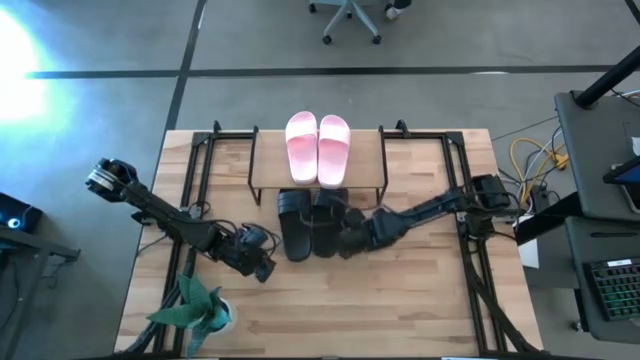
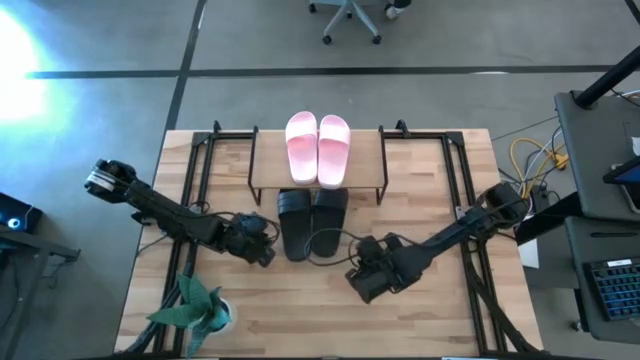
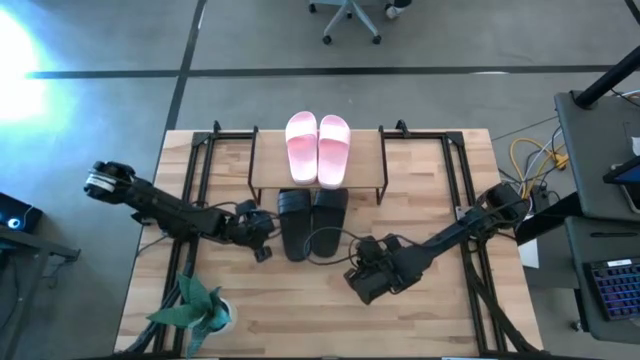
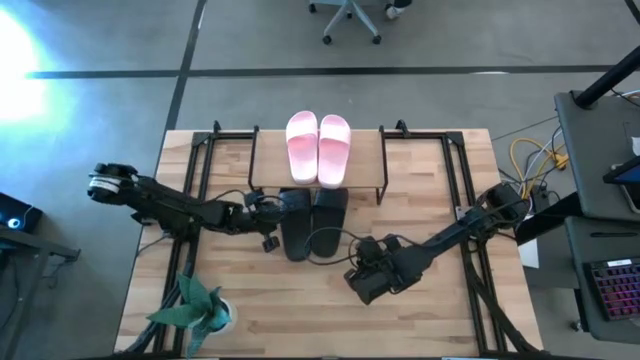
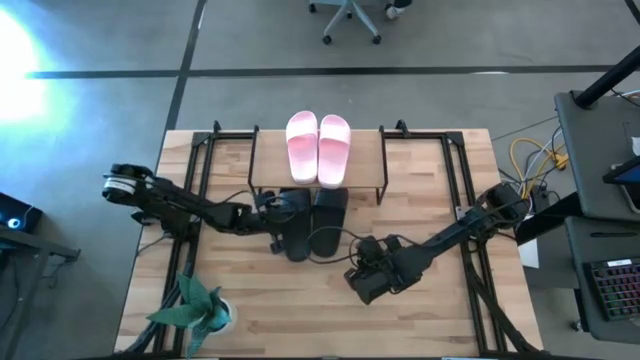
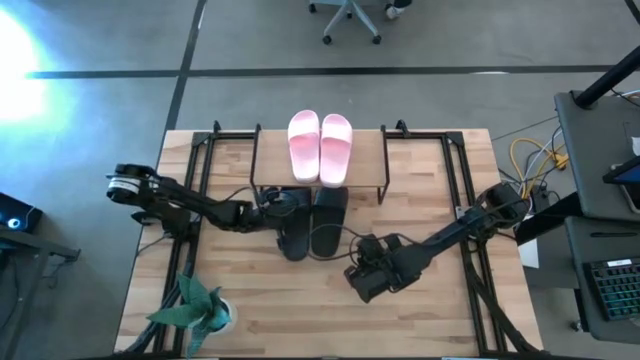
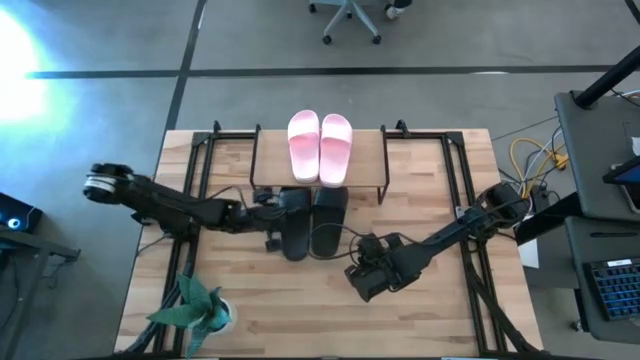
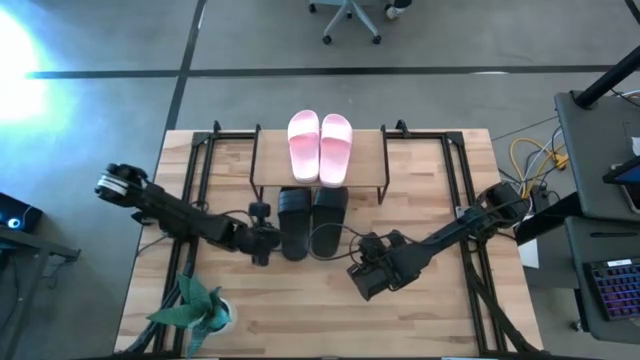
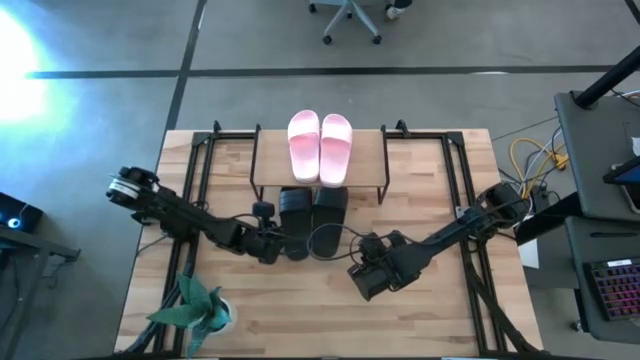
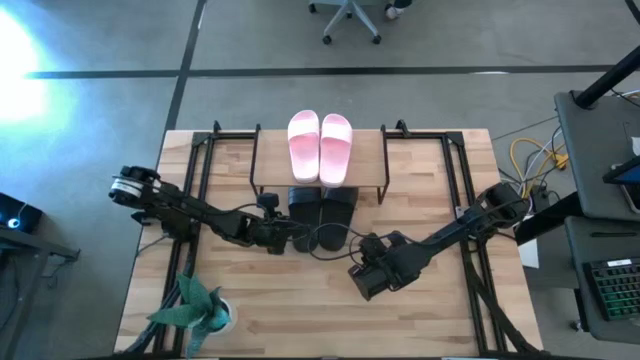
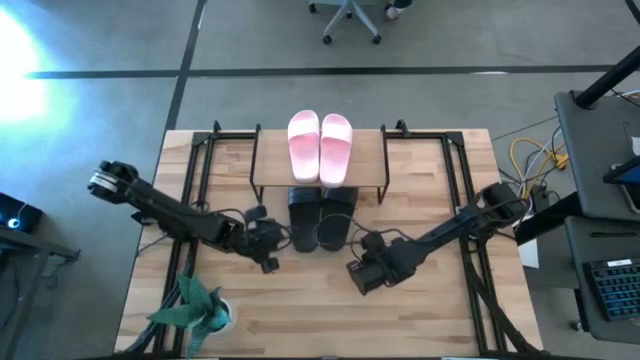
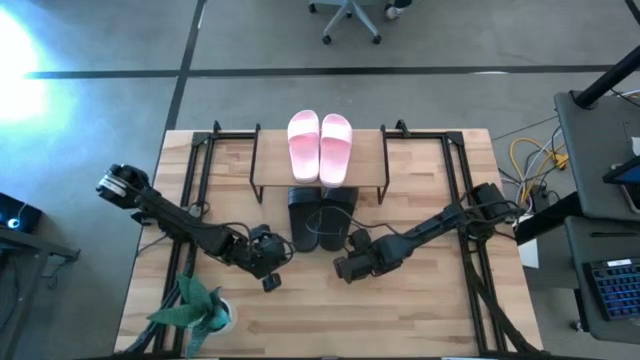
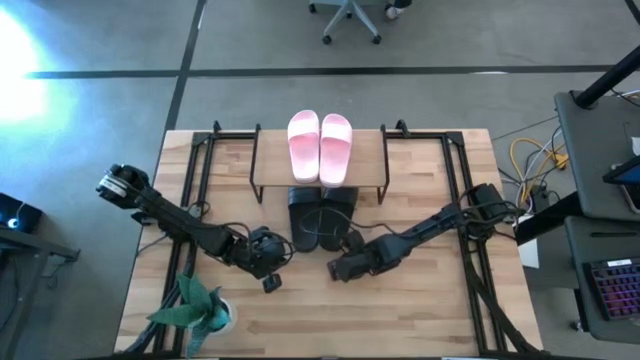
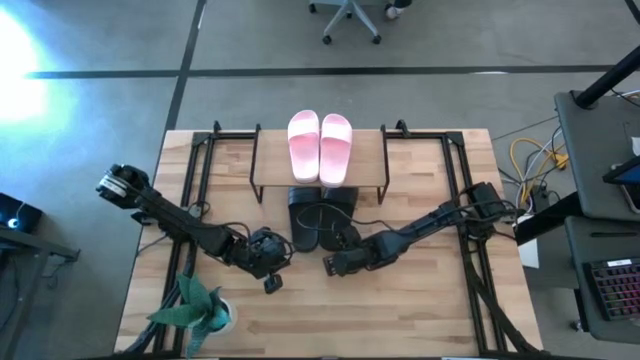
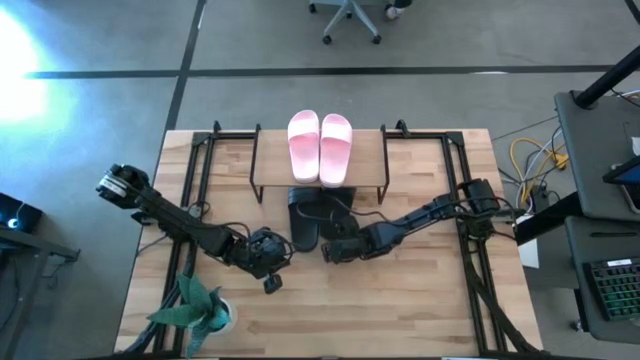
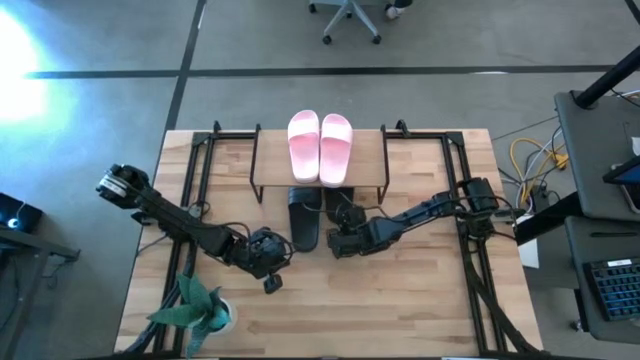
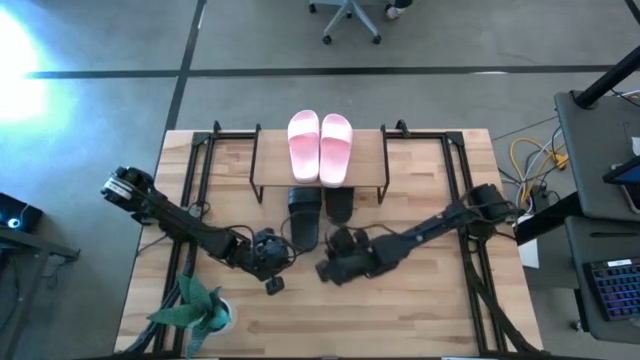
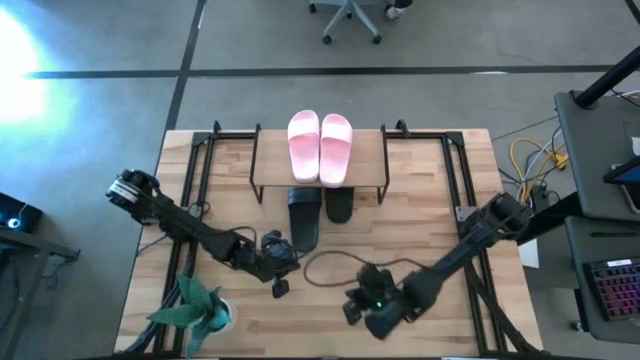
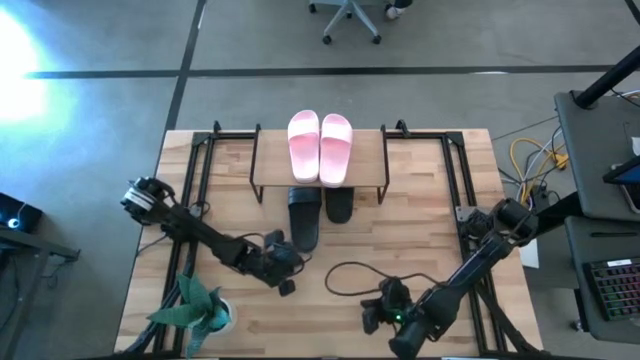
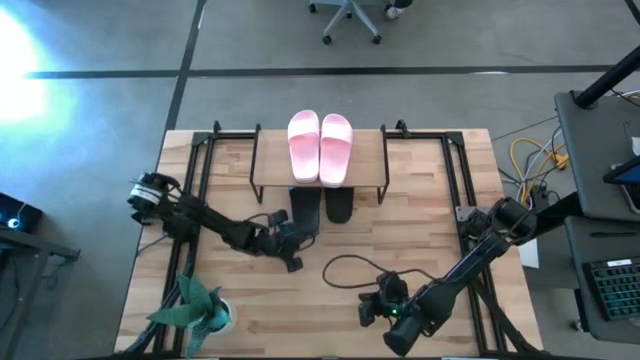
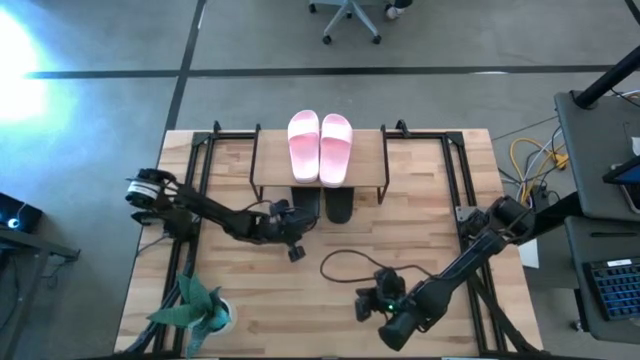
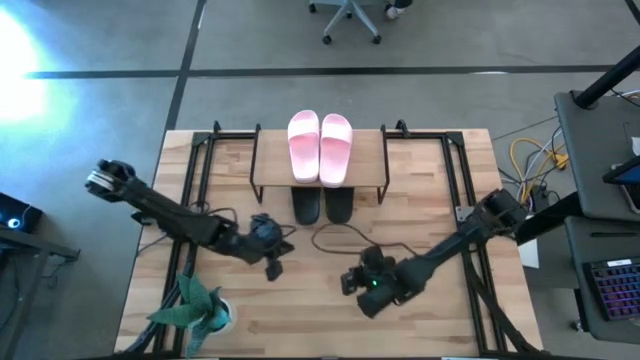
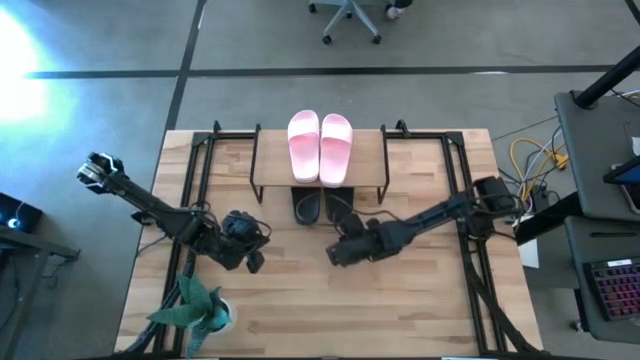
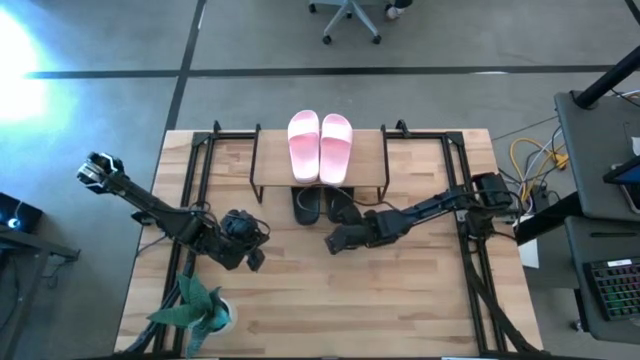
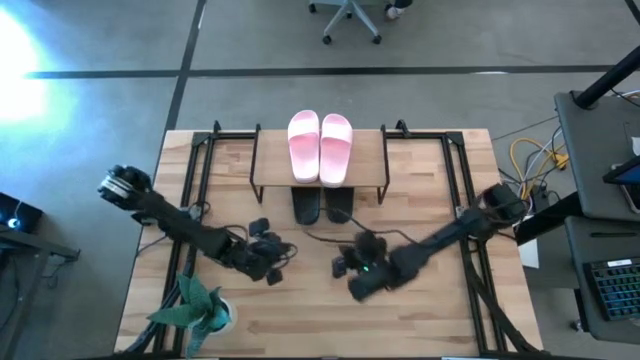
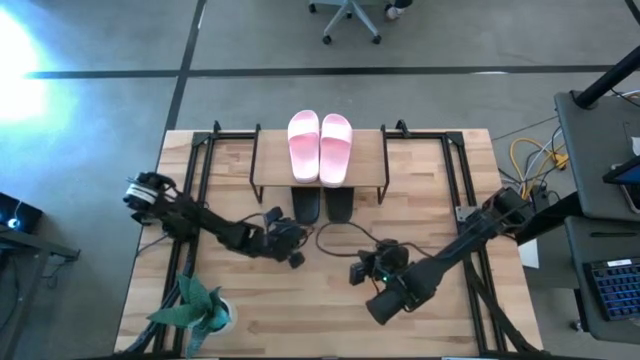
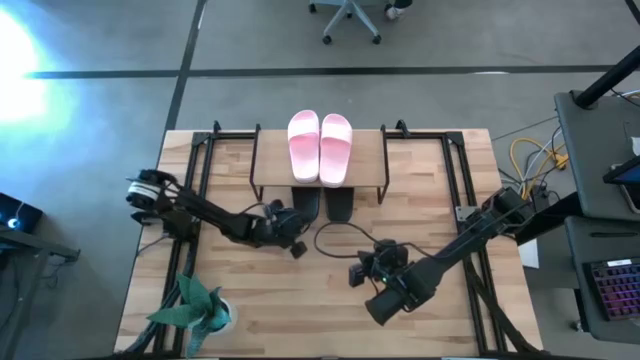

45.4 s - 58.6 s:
Task: Pick and place slides into the shelf
Adjust the black slide under the shelf

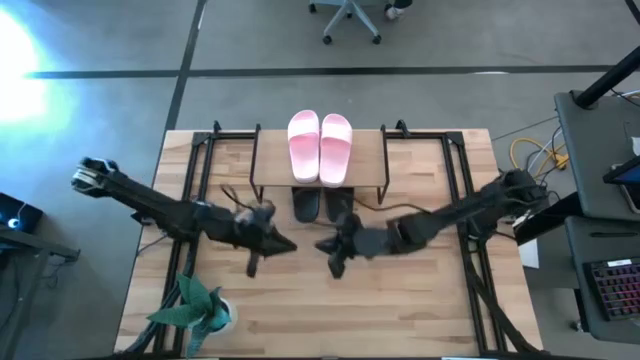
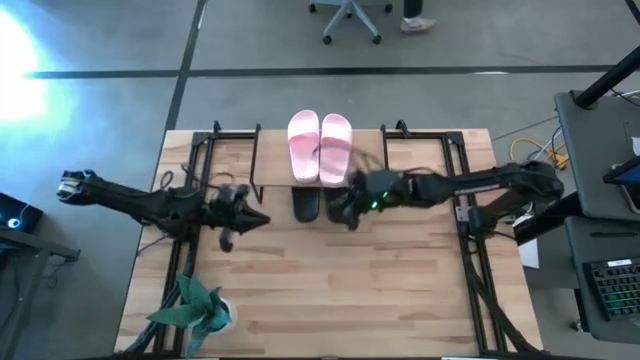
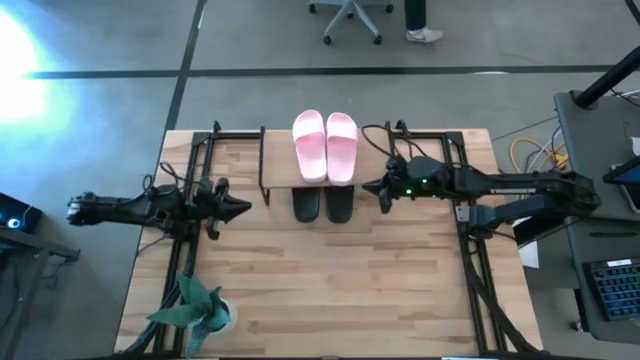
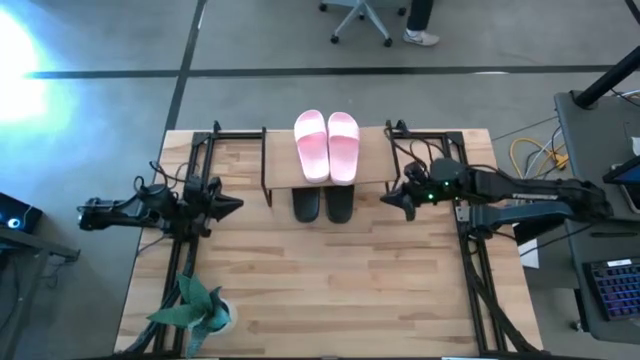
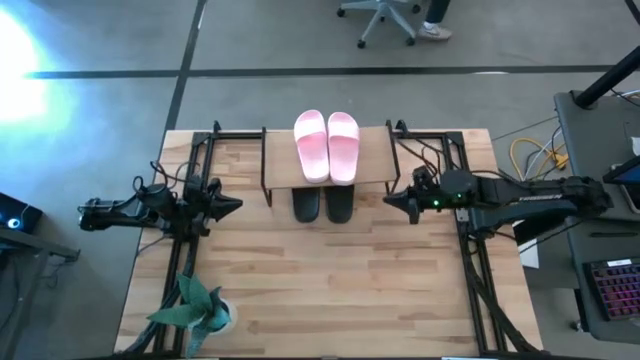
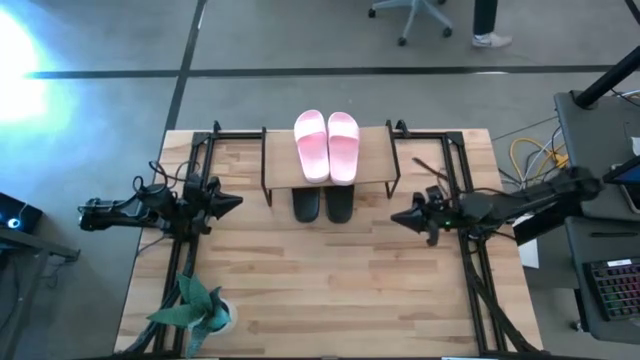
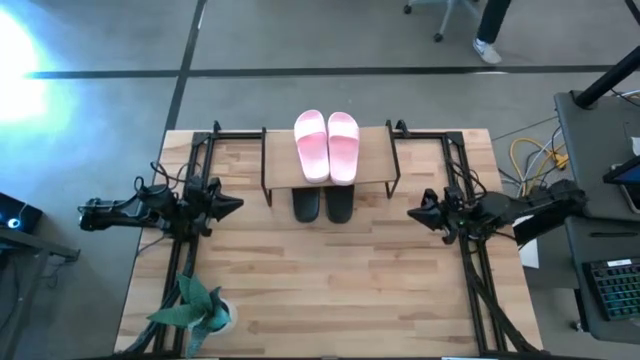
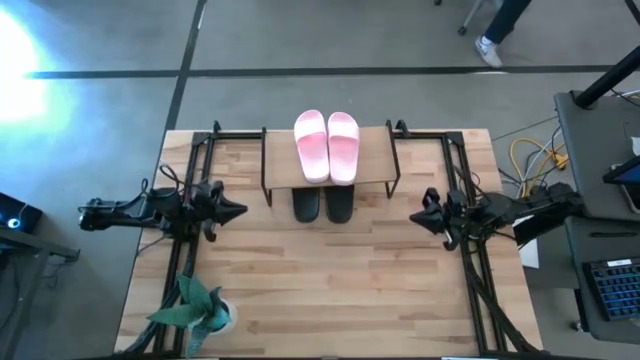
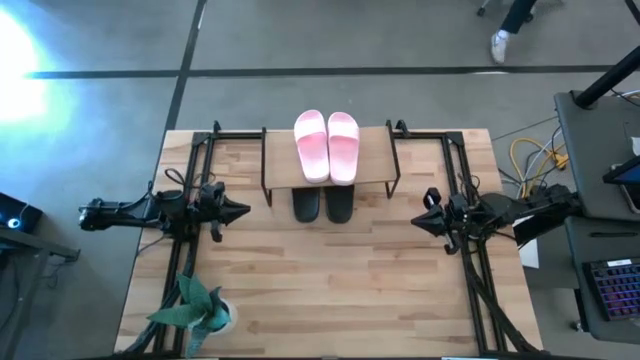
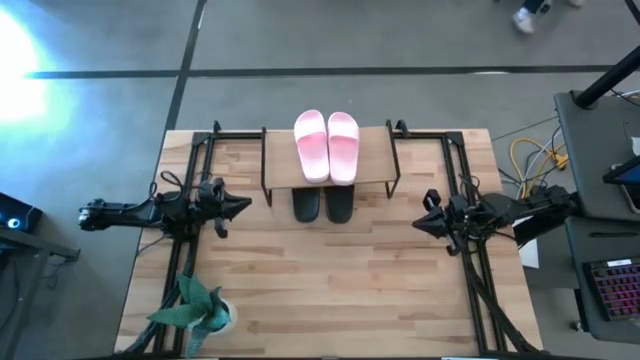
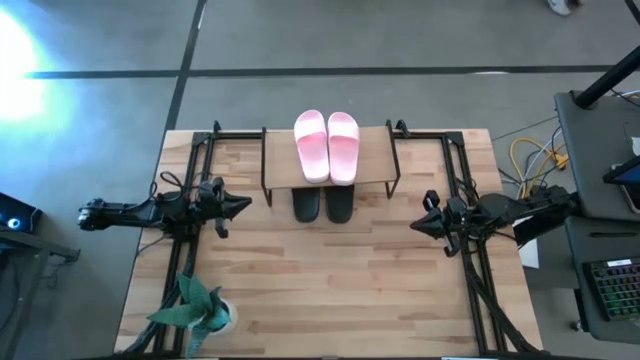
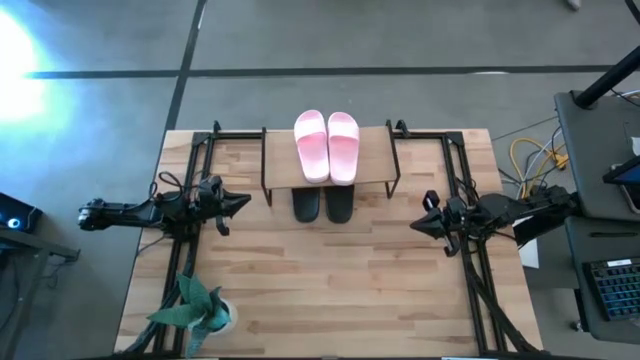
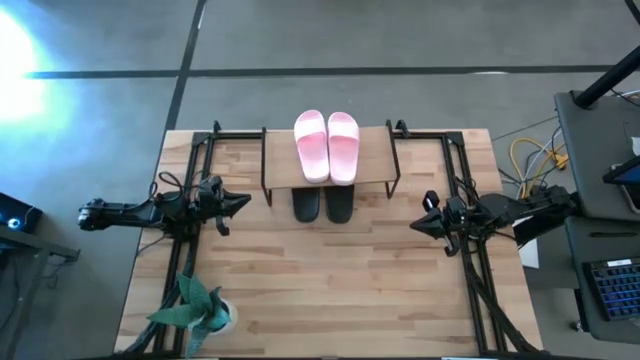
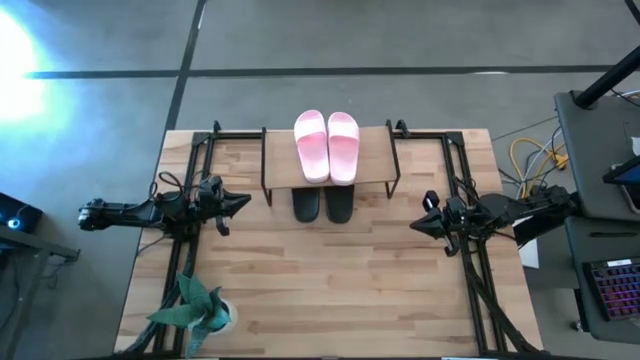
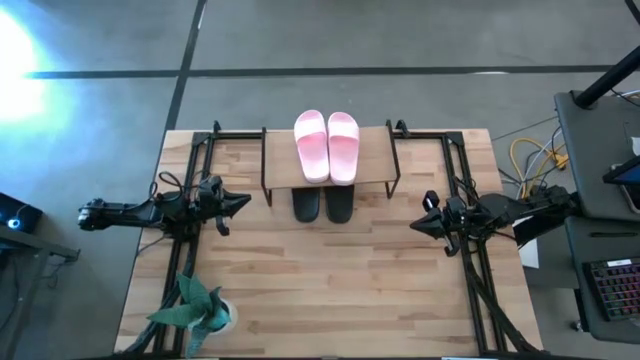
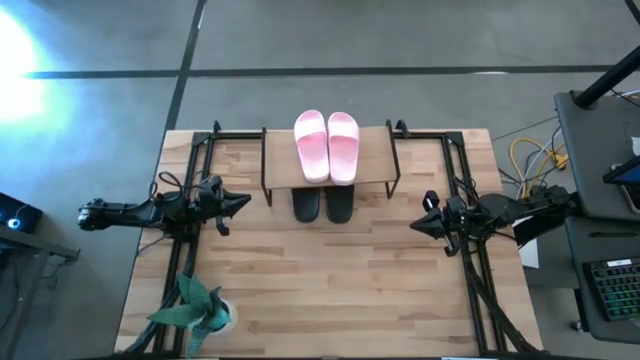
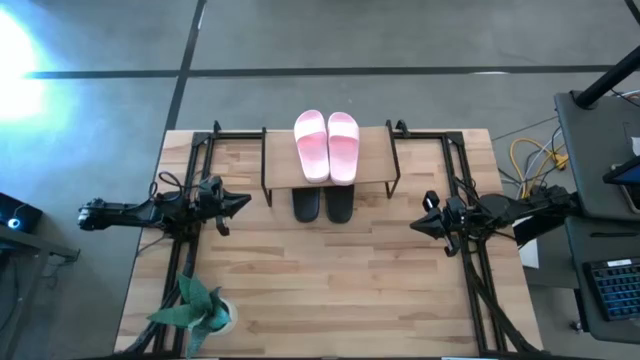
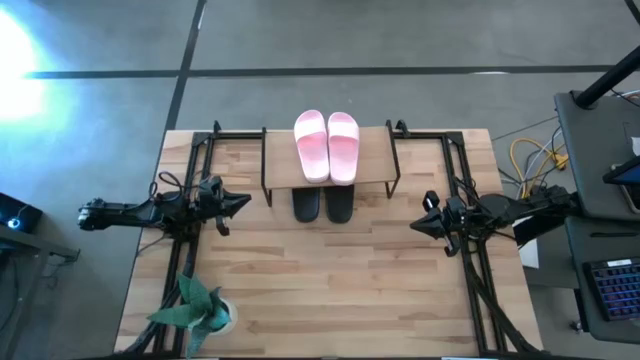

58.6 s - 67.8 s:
Return to Home Position
